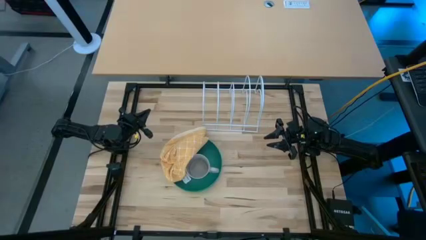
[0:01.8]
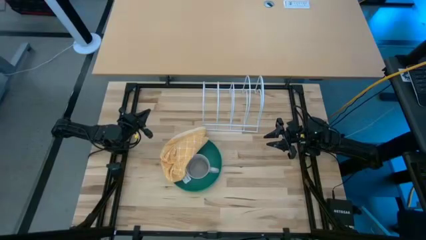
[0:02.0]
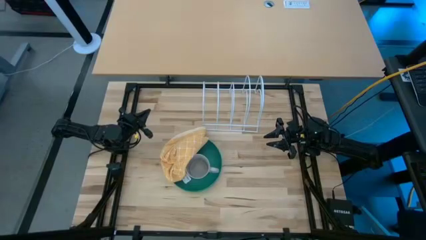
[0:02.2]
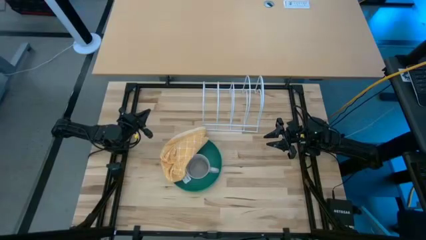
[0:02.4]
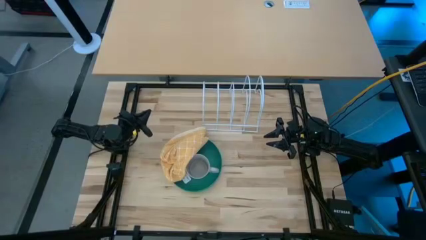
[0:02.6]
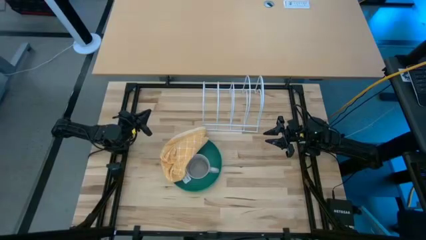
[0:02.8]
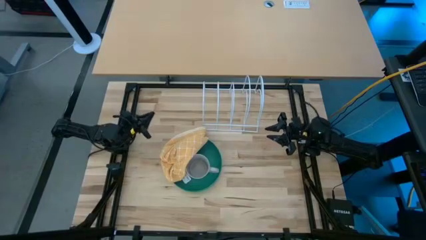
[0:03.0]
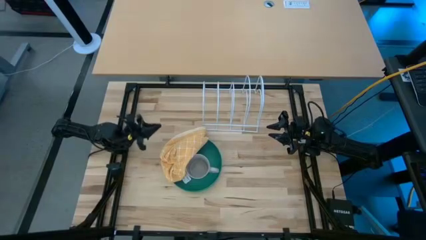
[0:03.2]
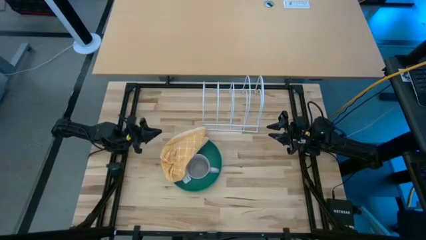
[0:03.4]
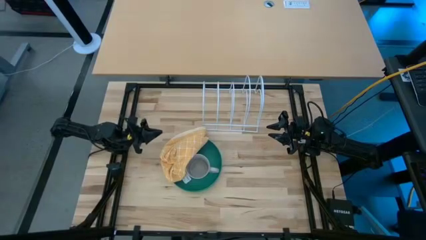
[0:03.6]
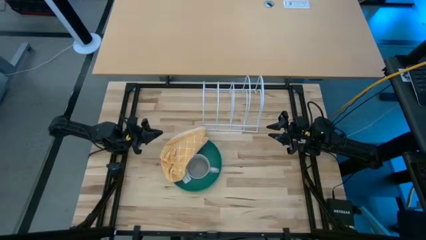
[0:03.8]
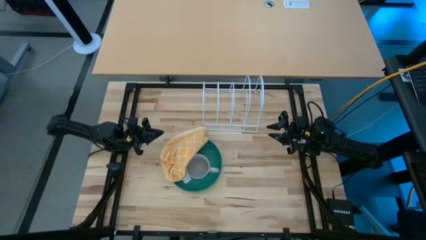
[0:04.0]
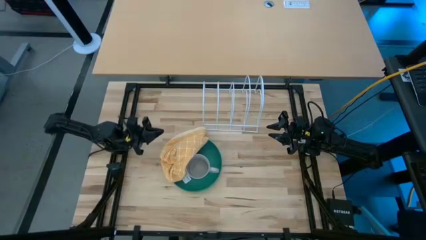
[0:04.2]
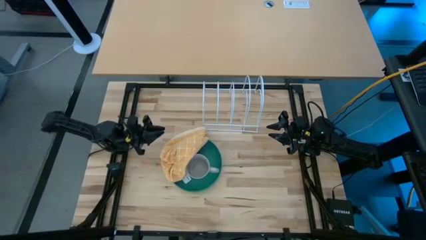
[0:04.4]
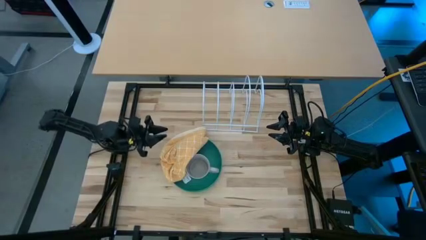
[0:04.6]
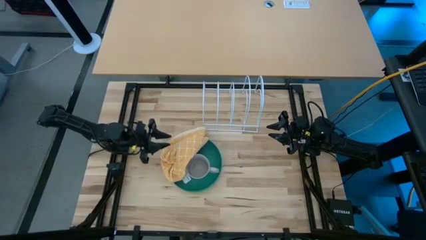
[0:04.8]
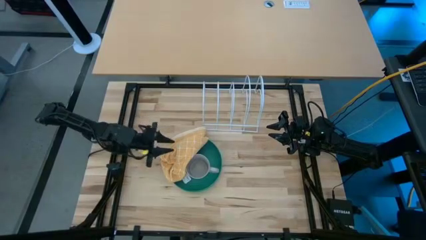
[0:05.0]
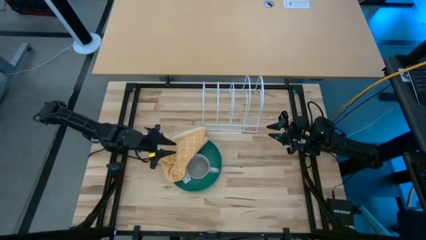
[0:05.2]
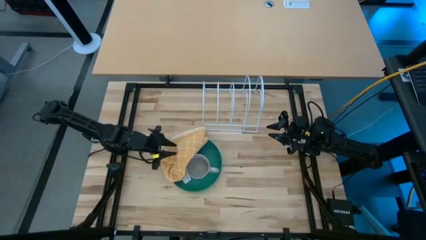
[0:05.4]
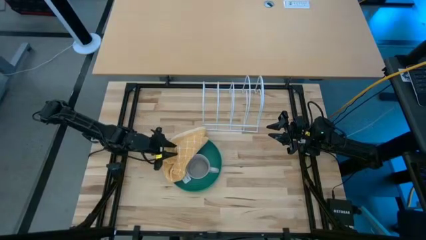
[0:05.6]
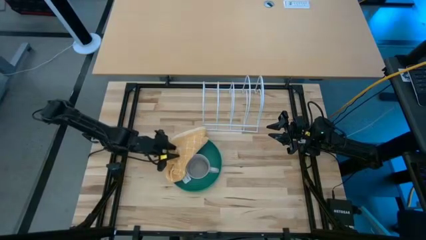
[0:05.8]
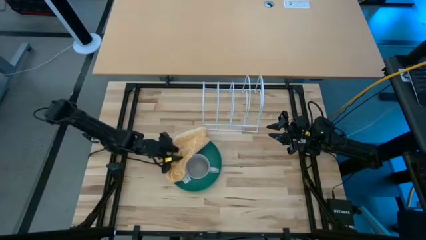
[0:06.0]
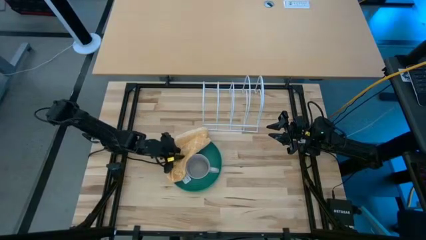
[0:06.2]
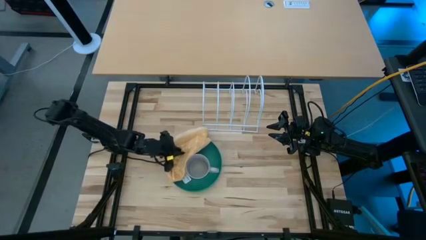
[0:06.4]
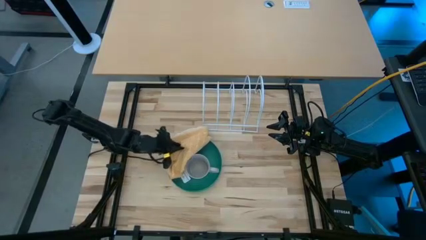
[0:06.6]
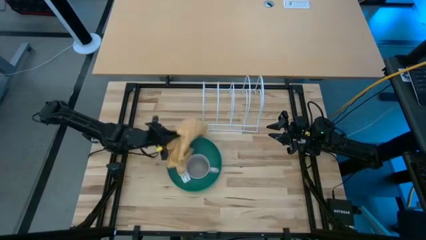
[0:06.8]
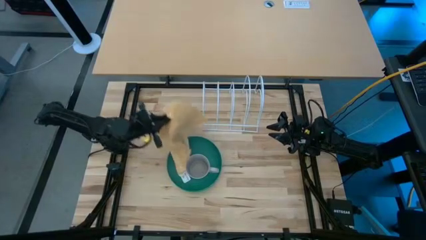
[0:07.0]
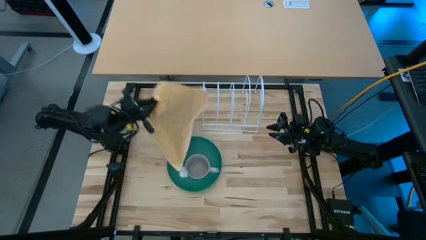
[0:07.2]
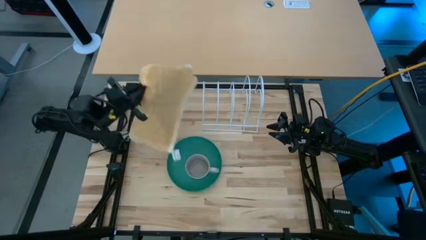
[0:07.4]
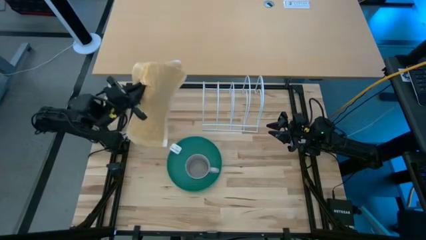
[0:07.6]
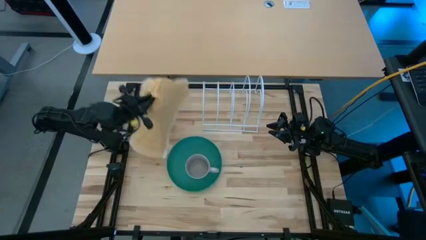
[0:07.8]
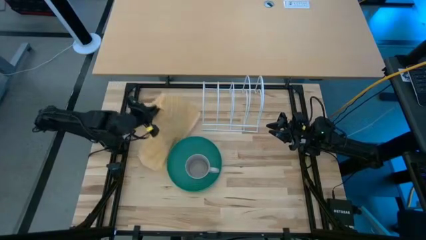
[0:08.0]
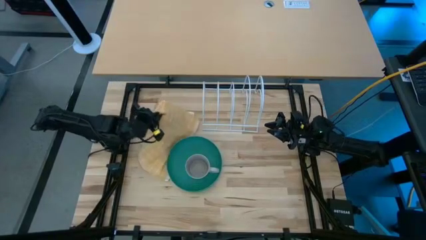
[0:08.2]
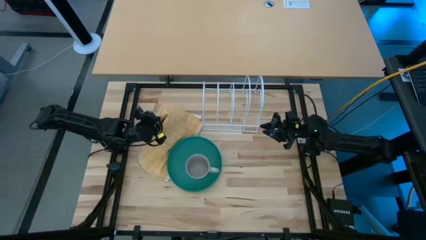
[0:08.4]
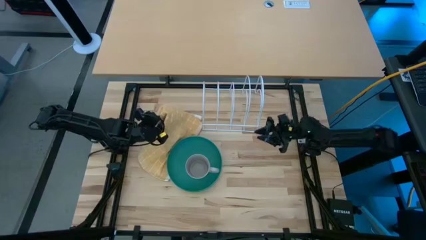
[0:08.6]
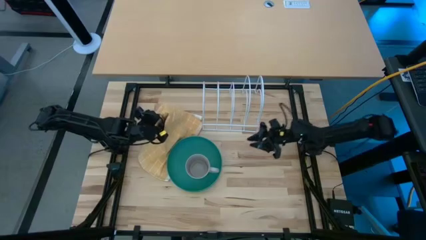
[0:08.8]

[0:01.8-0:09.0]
Task: Sort dishes
Remove the yellow towel from the stack of plates

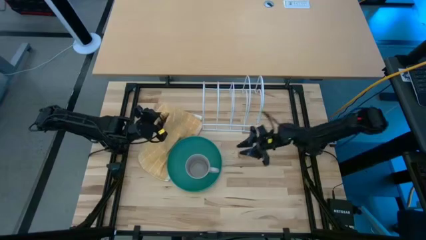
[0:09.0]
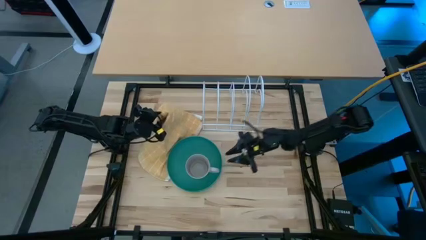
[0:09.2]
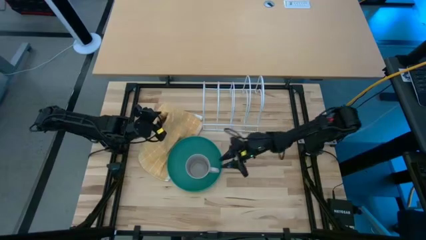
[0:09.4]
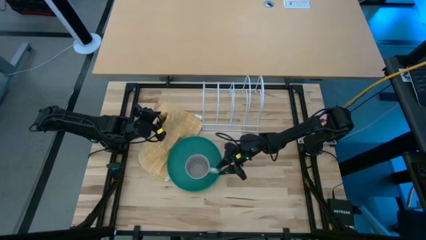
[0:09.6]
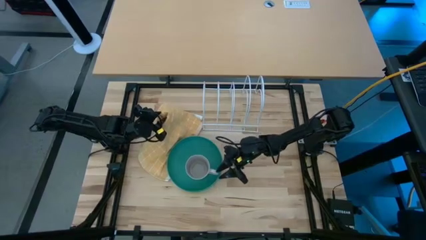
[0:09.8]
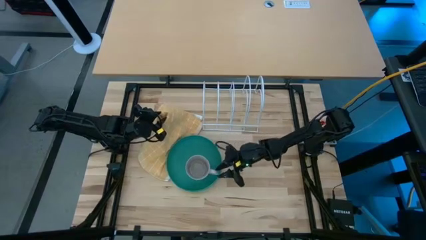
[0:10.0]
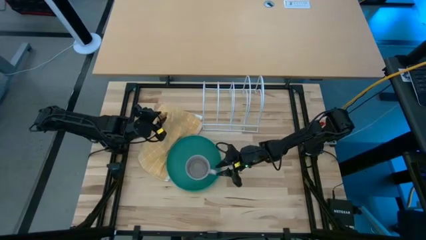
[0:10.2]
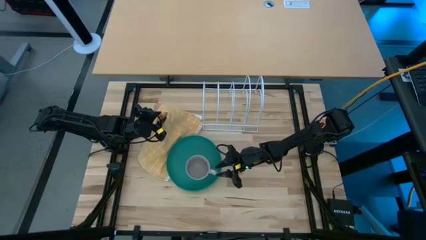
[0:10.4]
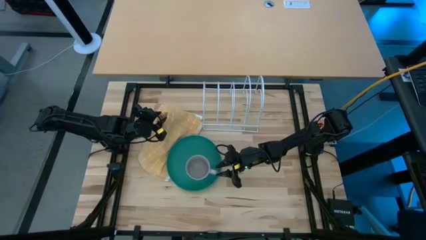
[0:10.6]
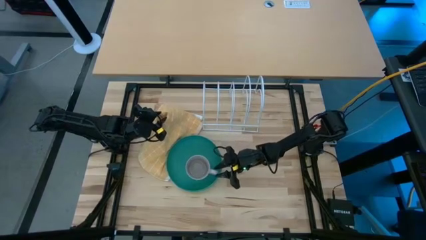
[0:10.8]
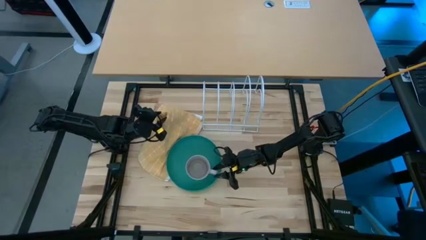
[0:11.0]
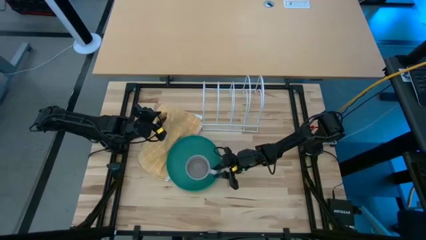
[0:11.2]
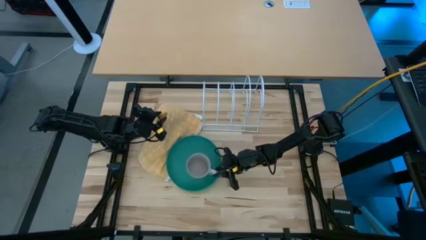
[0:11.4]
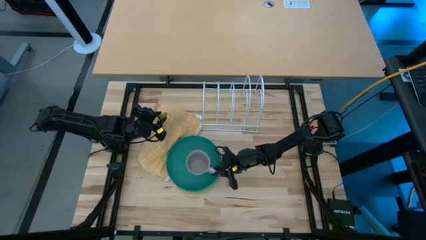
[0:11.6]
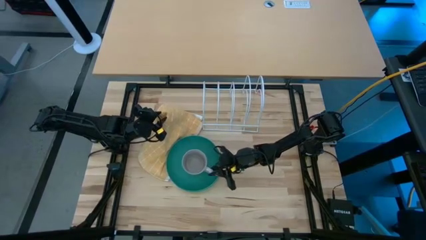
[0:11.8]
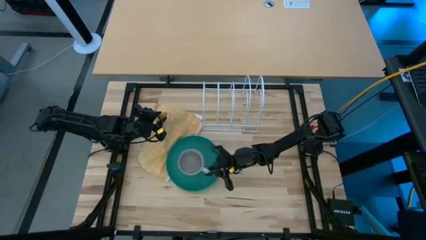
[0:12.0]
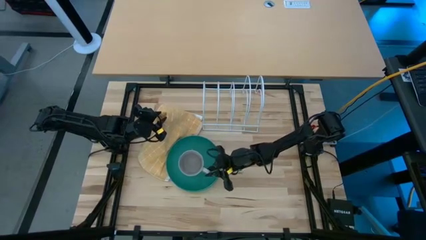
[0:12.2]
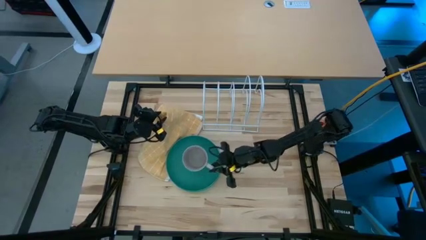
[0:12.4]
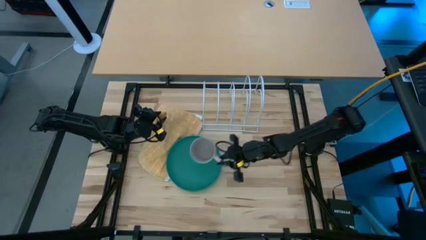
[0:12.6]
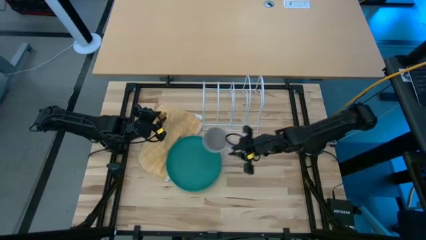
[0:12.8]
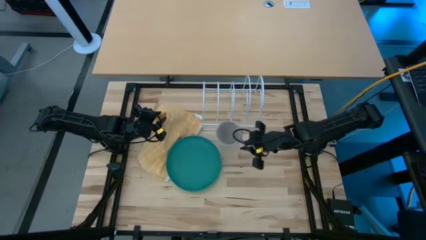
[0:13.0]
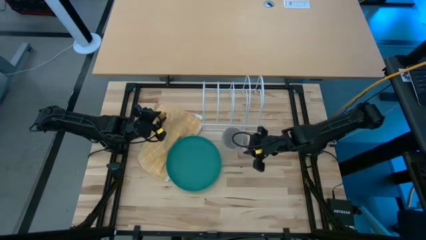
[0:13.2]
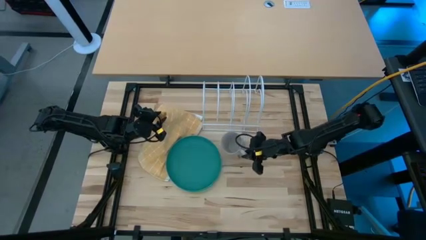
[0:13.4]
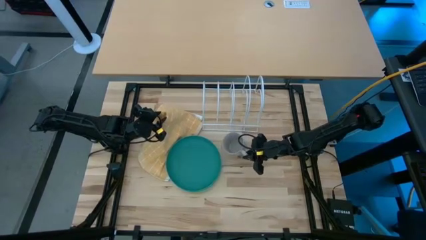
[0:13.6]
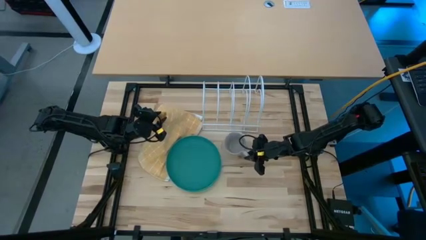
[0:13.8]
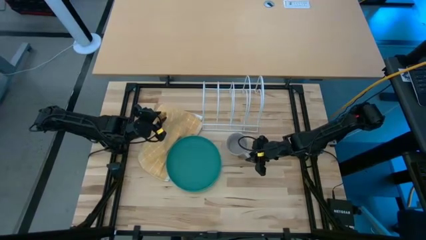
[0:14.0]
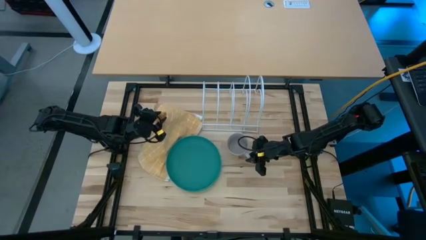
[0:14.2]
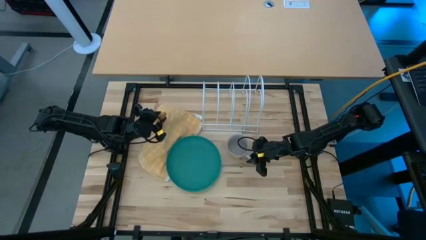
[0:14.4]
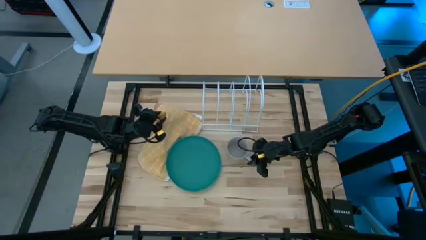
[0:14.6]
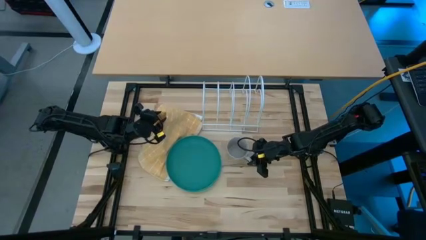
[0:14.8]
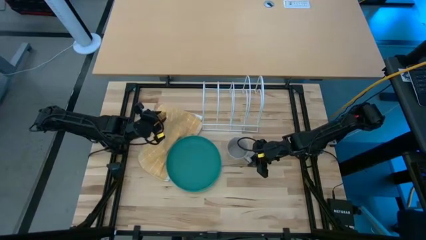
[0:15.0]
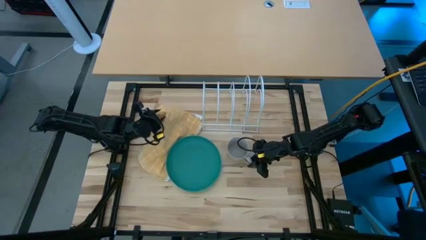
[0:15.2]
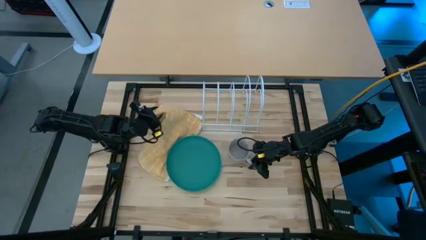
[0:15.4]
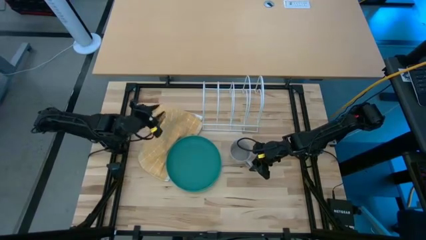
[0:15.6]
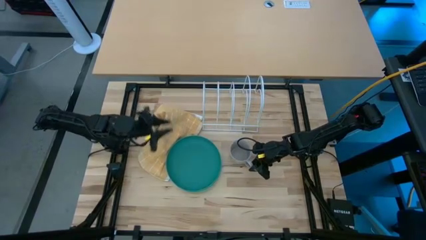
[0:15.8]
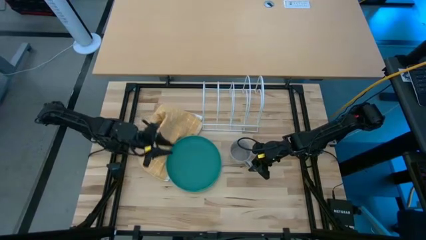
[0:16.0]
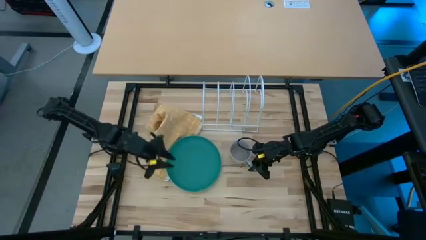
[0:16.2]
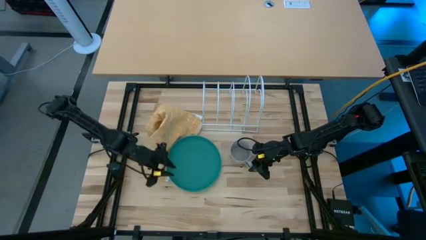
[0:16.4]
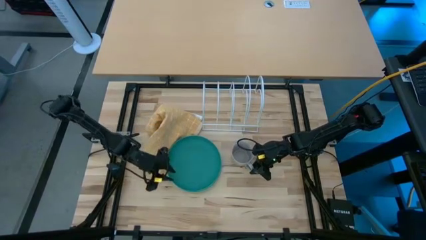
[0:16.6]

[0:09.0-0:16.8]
Remove the gray mug from the stack of plates

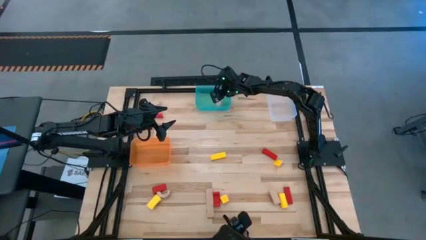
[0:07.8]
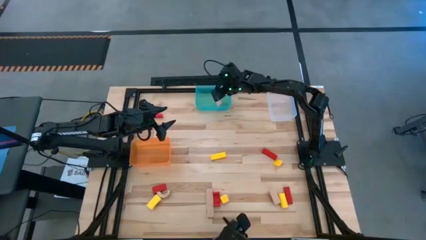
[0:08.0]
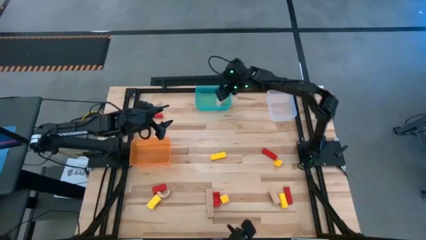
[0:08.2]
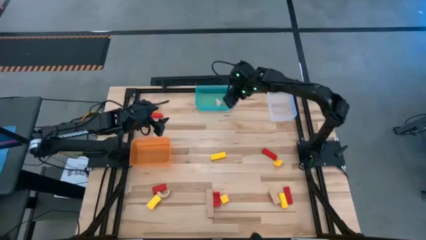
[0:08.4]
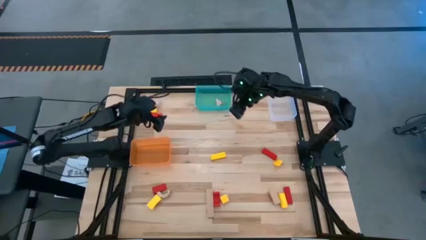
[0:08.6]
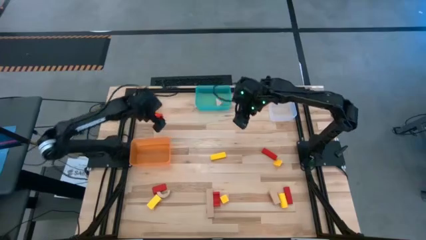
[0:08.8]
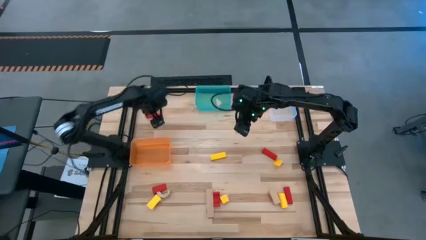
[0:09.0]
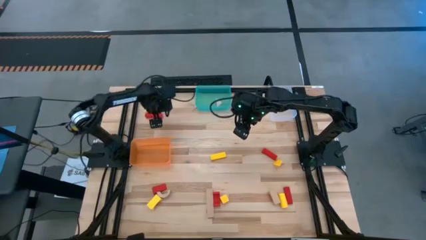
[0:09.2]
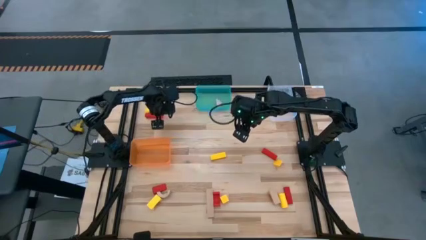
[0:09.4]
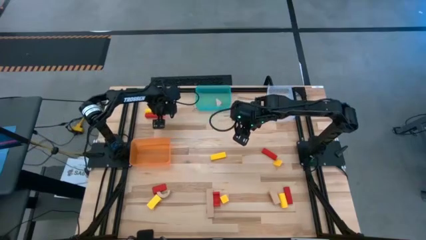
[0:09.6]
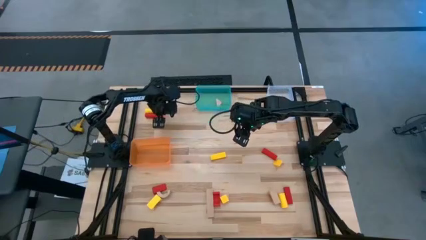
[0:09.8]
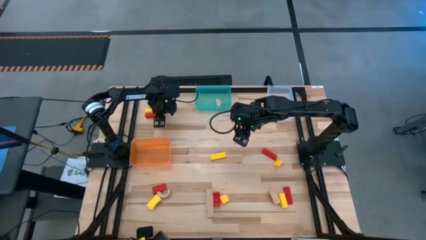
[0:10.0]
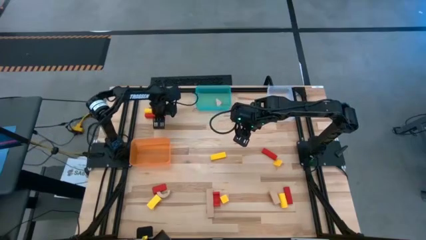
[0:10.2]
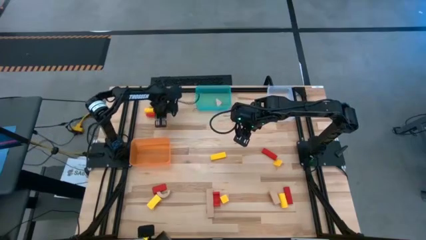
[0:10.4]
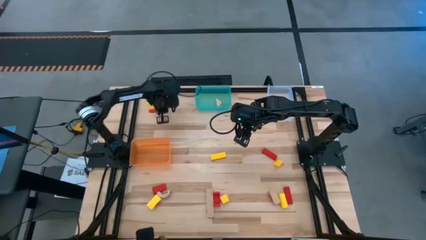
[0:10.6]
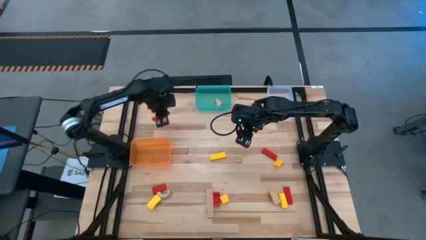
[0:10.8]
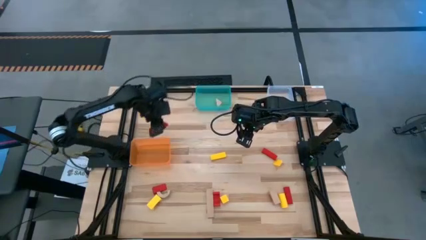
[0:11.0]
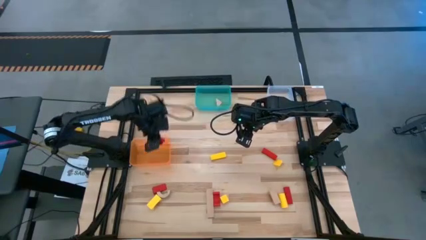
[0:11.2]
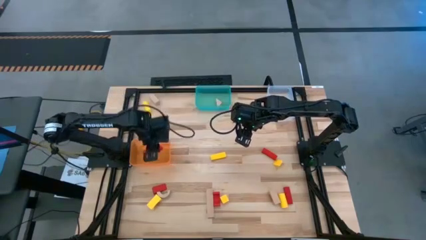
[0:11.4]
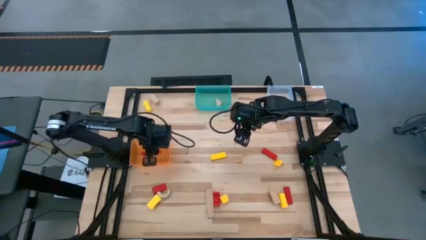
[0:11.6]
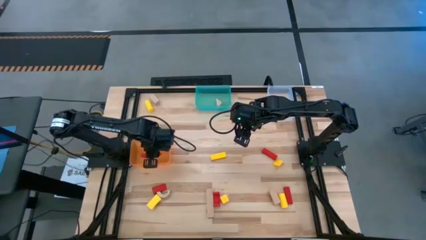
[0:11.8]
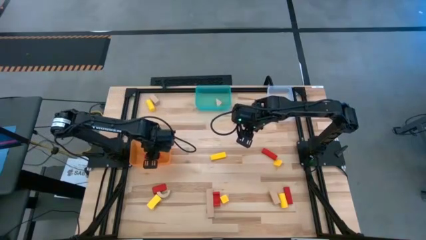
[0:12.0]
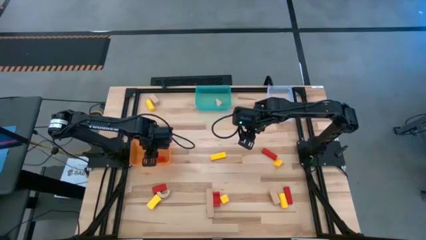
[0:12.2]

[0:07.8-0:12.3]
Task: Sort & place blocks by color
Put the red block into the transparent orange bin
